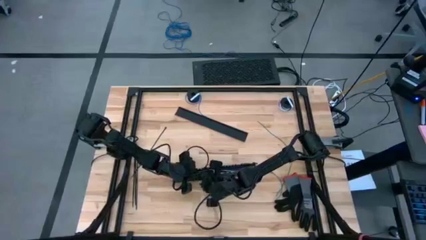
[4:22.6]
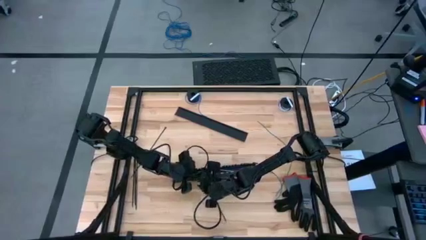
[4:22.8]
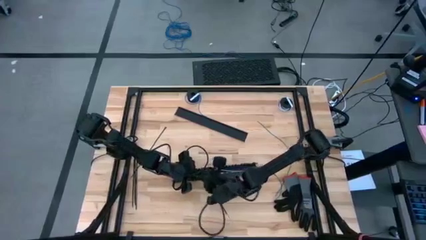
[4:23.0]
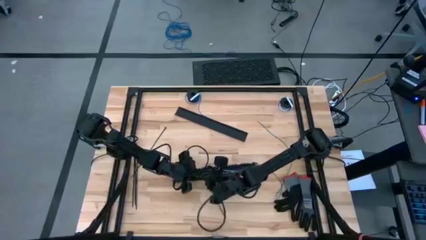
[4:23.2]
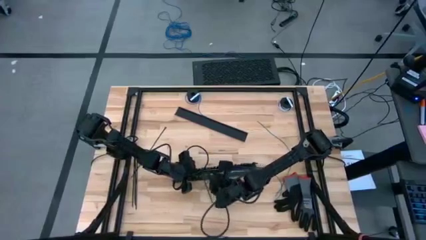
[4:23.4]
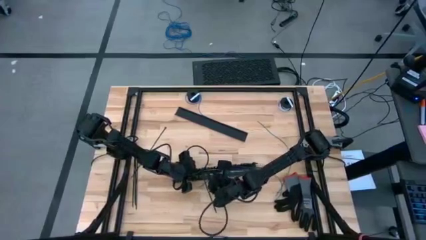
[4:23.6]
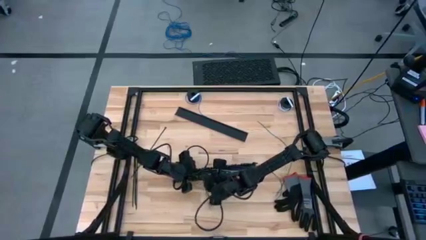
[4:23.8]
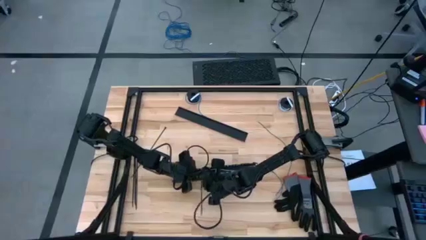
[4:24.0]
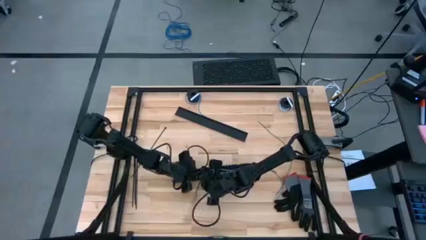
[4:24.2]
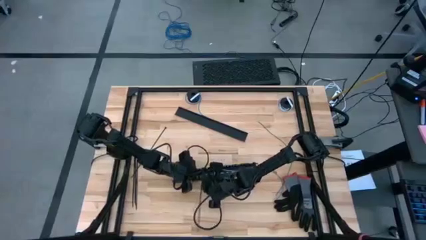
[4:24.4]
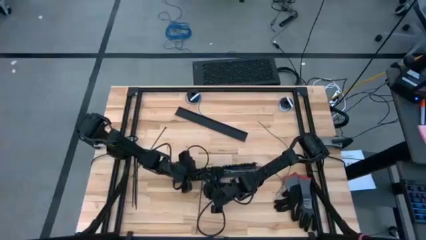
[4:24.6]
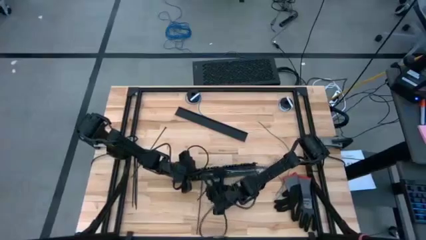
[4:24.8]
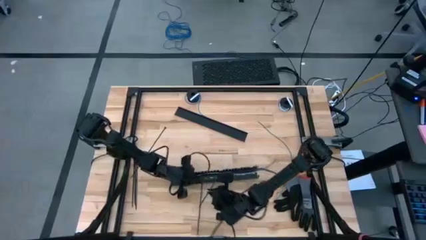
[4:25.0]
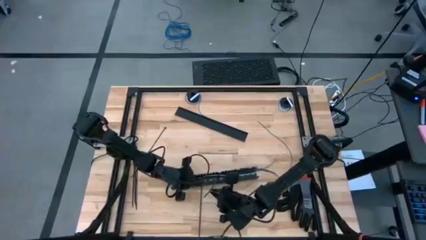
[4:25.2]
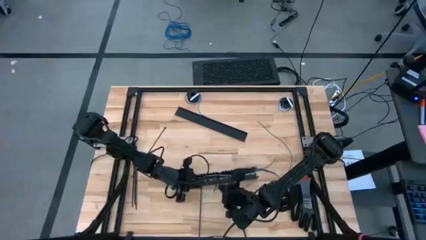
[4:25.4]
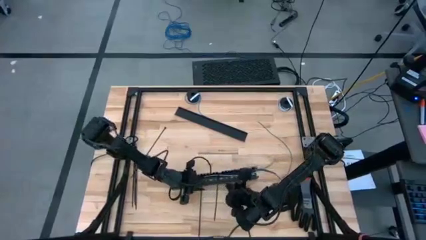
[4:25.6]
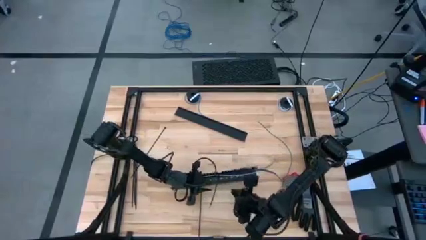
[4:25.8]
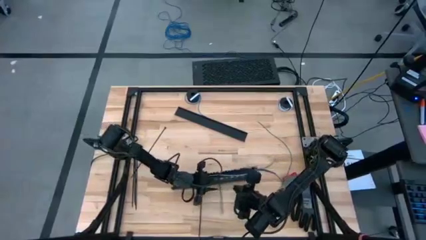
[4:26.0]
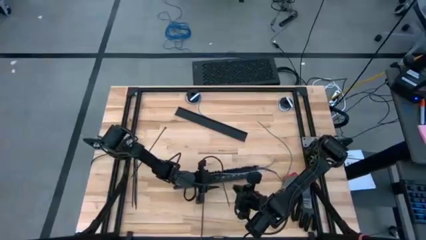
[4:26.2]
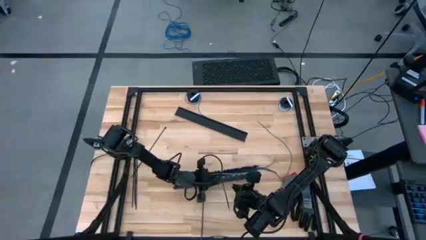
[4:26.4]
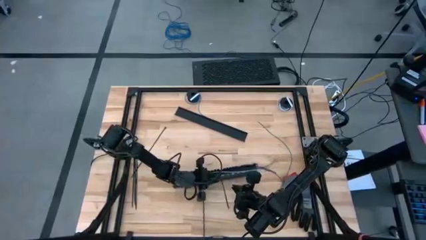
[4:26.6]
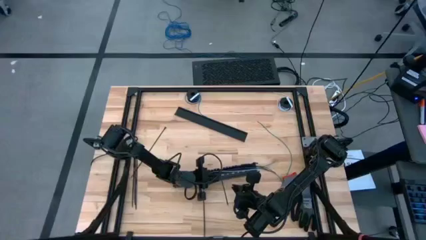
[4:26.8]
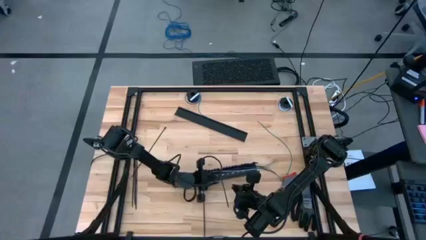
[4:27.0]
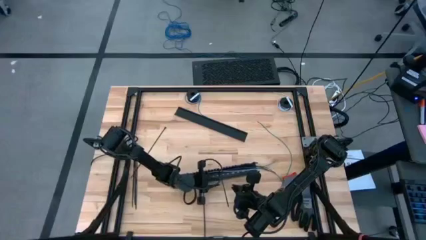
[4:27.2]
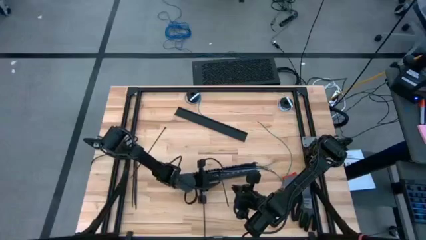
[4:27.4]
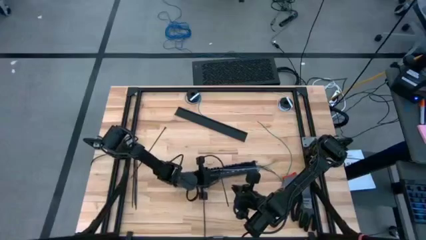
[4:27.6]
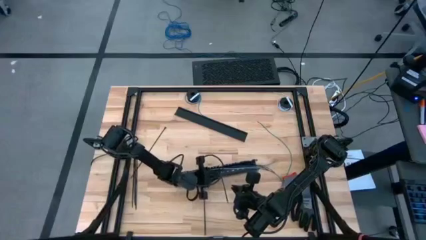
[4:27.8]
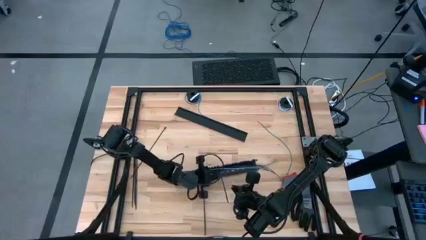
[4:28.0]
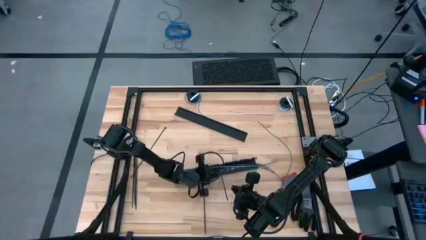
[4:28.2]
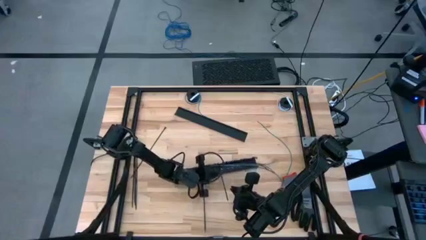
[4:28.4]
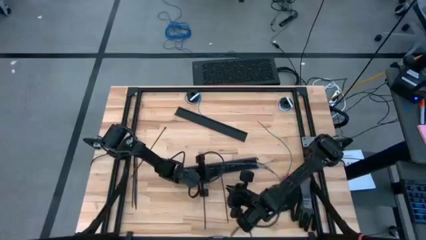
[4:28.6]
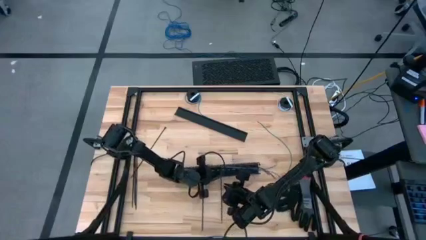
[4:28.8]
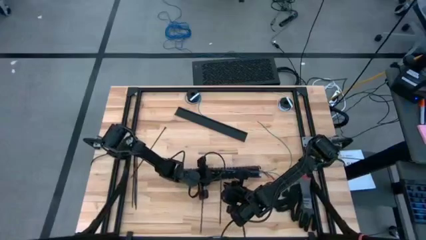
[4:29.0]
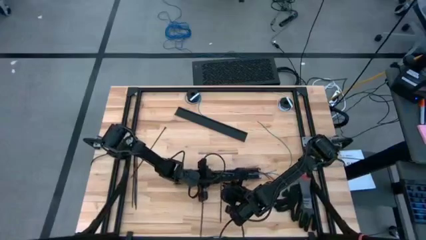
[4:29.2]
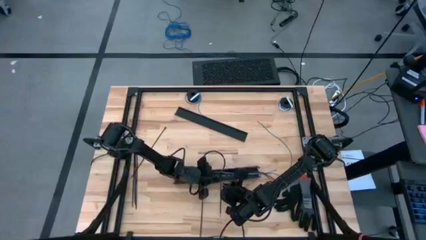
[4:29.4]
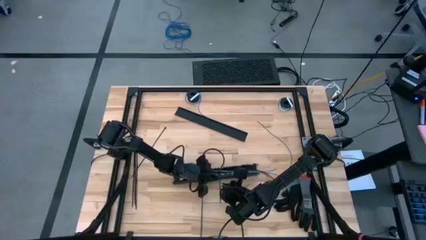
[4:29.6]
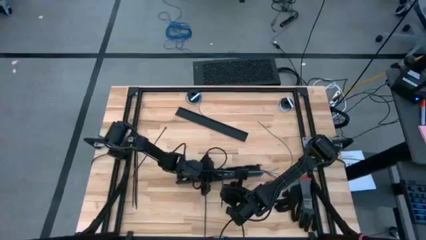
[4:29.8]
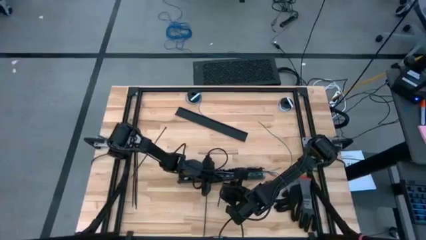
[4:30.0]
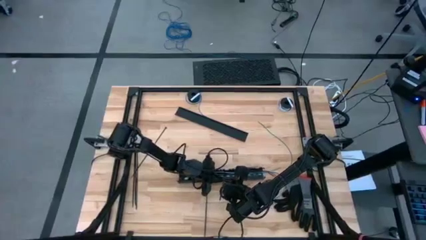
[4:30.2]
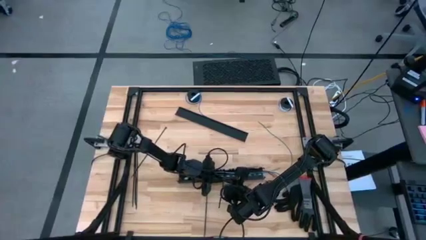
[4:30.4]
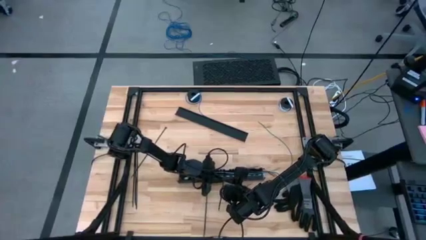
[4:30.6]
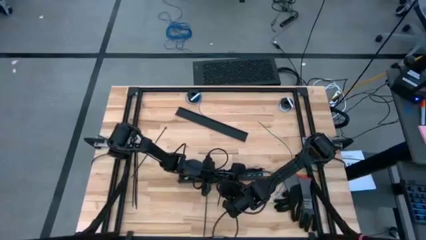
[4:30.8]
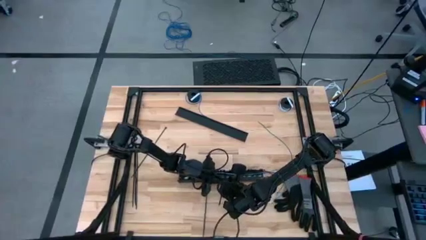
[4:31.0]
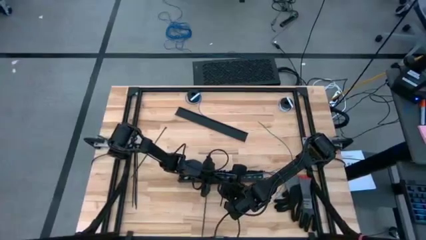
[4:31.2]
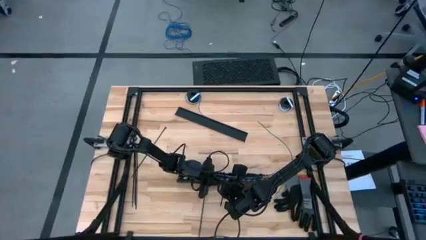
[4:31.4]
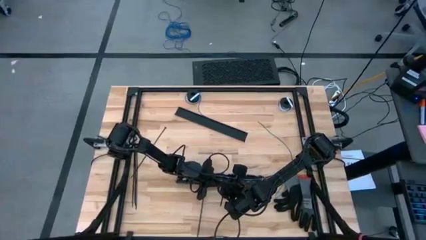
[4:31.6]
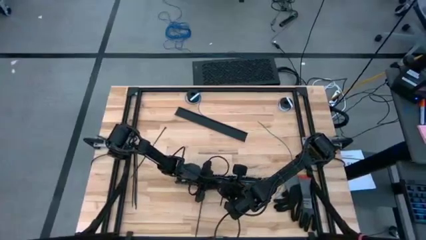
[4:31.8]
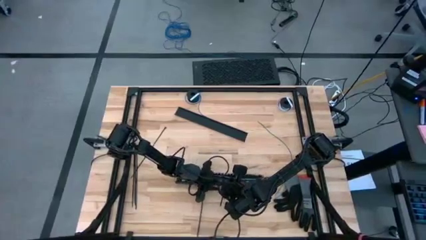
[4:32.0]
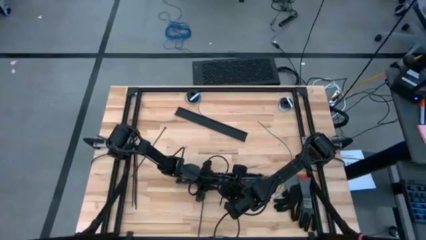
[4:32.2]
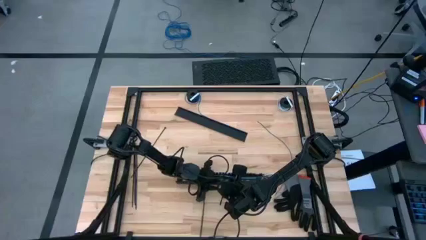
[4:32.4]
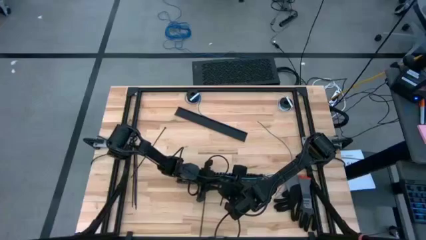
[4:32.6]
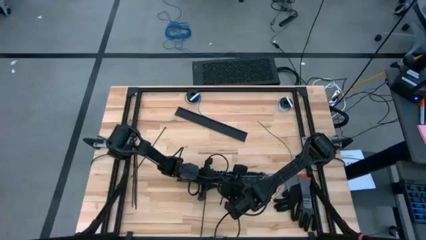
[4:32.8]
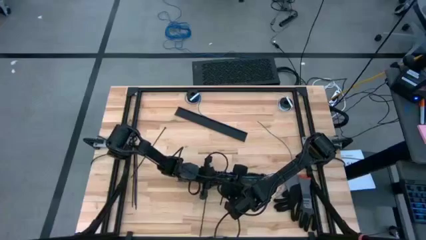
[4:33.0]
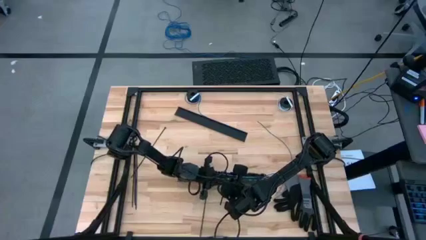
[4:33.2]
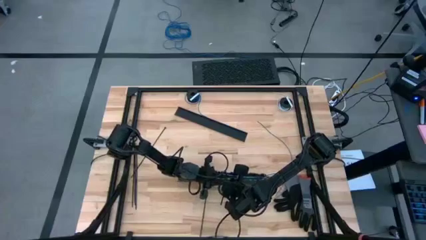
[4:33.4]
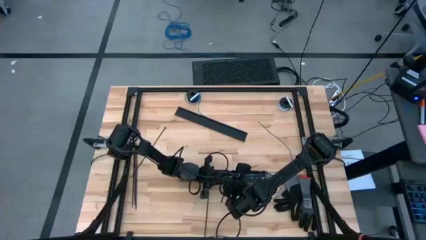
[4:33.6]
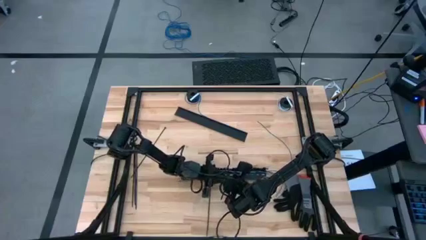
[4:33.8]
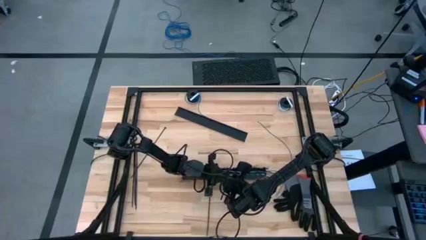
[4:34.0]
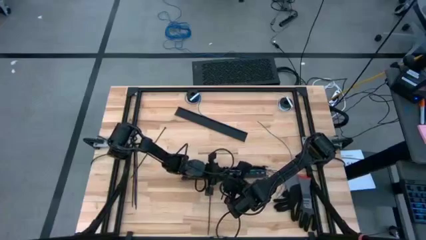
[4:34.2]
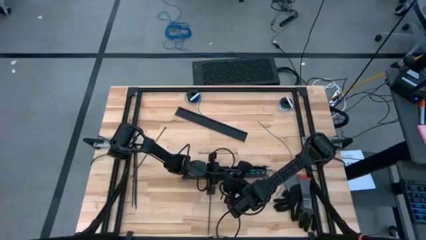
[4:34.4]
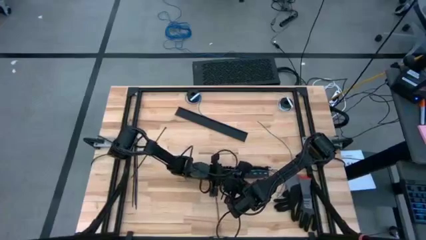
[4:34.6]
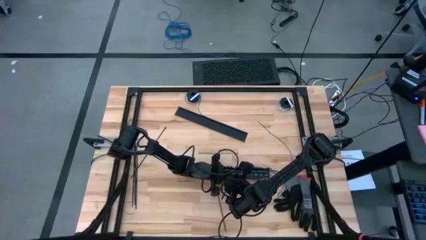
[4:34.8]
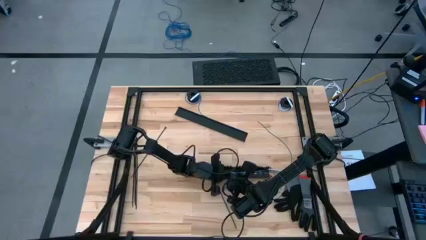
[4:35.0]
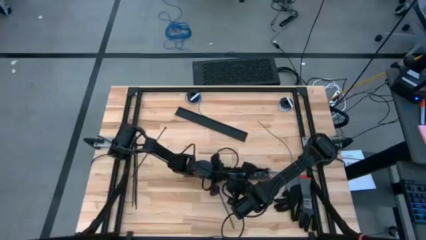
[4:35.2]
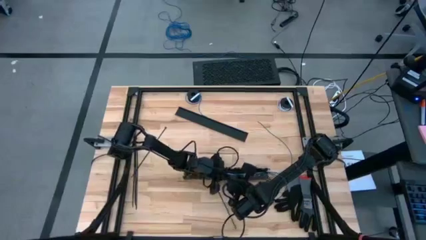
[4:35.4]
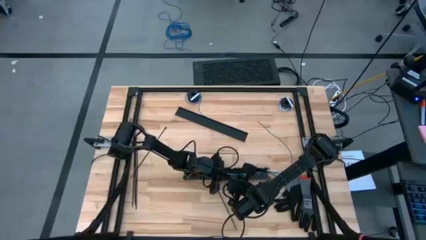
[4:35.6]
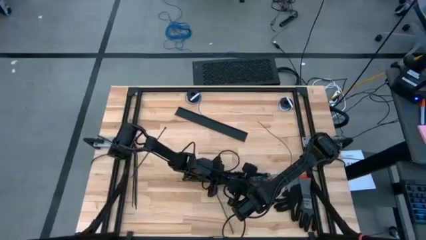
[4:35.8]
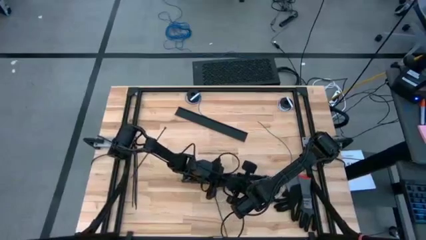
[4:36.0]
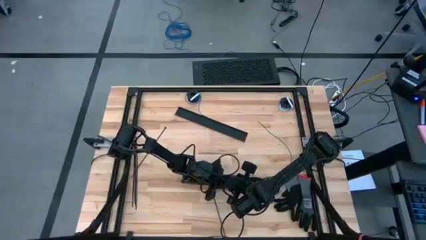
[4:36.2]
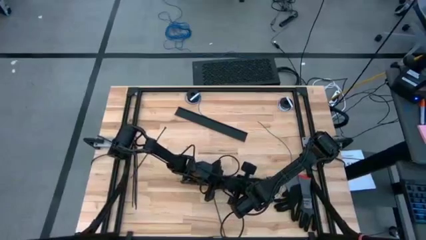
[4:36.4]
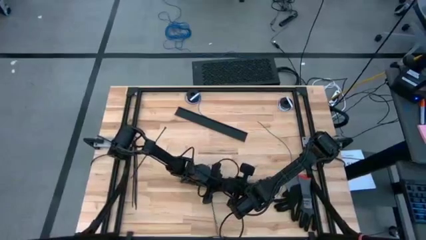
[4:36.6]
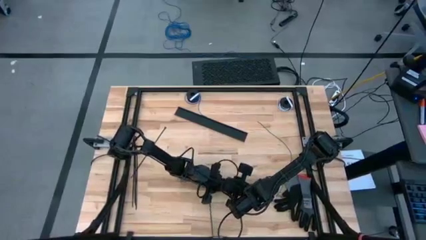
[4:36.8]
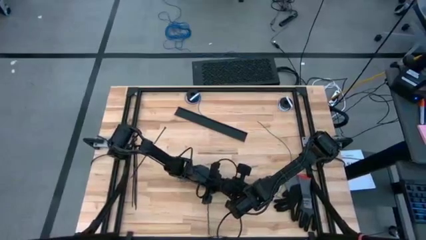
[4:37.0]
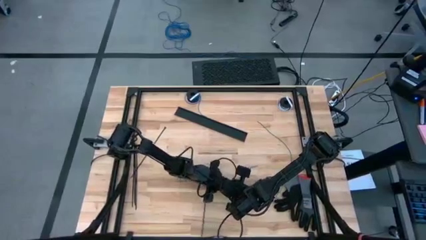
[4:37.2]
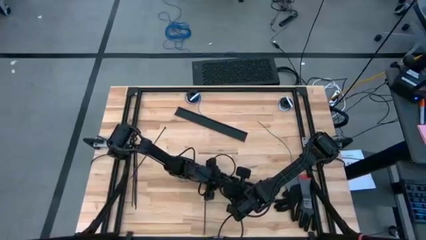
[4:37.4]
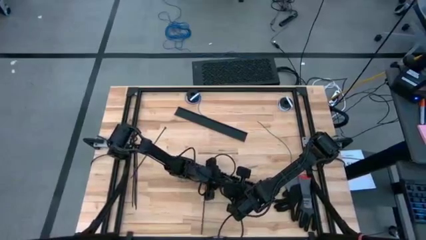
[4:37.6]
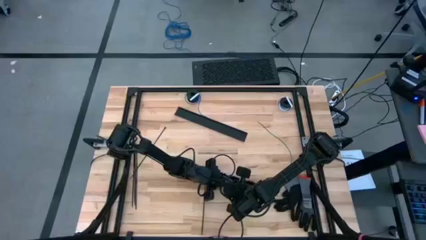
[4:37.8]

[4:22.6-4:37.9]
Task: Ziptie cables
Put the zip tied cable wire into the black cable duct
